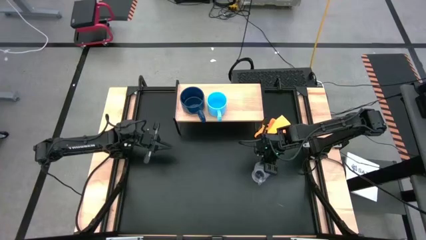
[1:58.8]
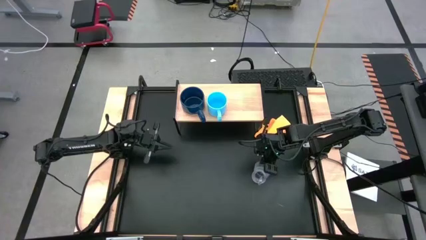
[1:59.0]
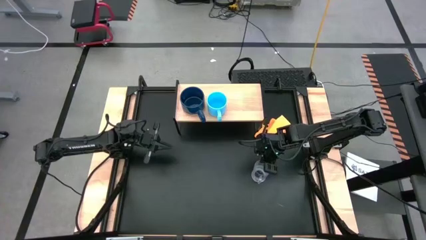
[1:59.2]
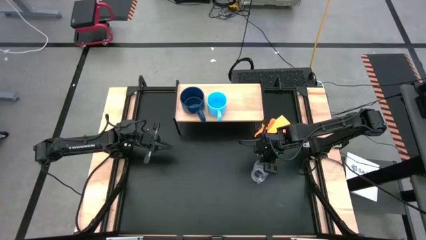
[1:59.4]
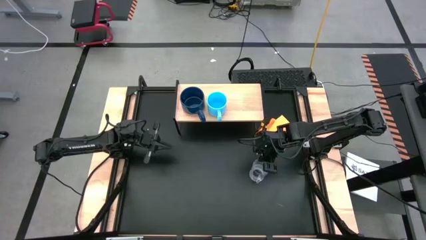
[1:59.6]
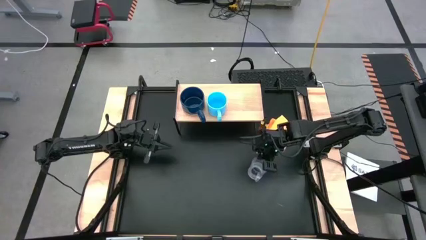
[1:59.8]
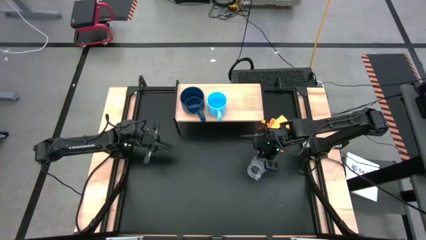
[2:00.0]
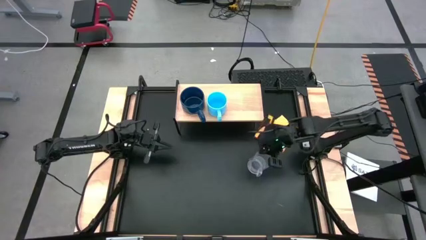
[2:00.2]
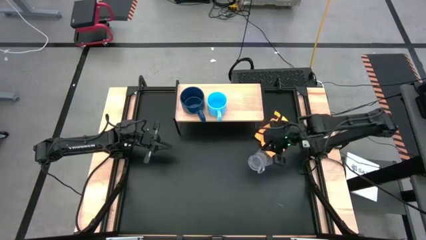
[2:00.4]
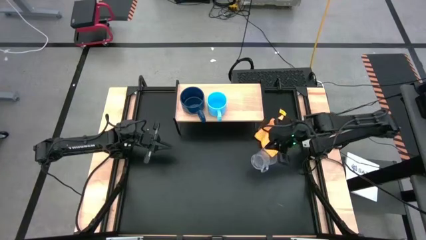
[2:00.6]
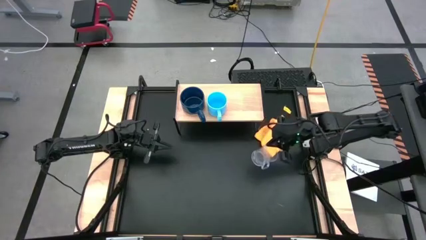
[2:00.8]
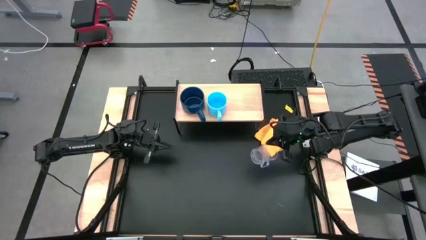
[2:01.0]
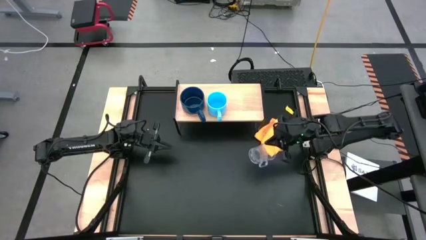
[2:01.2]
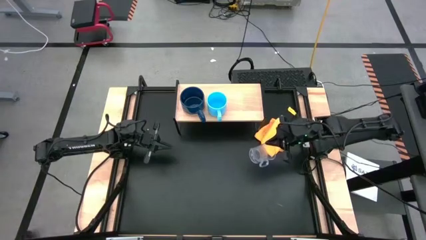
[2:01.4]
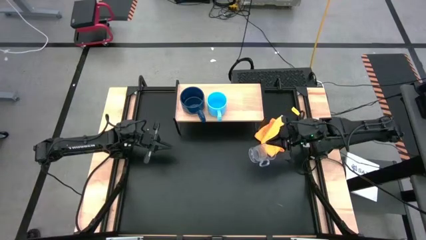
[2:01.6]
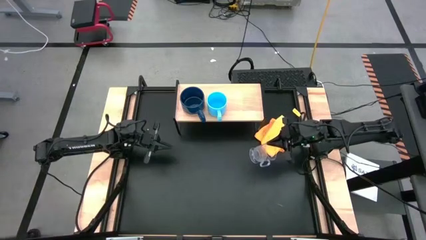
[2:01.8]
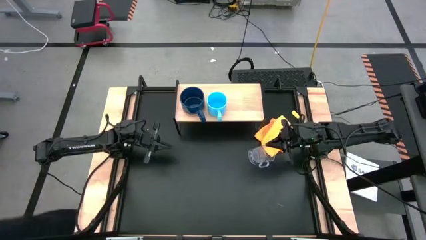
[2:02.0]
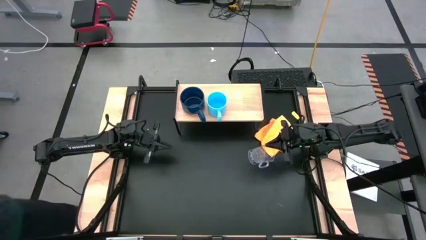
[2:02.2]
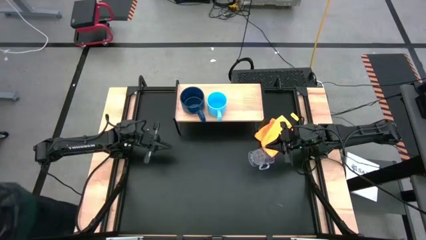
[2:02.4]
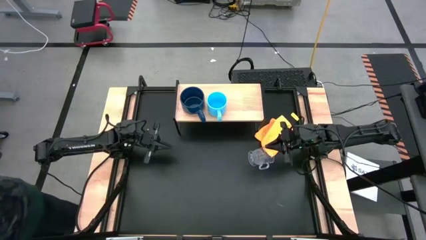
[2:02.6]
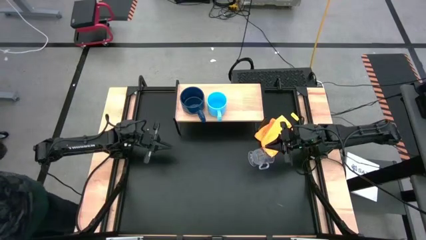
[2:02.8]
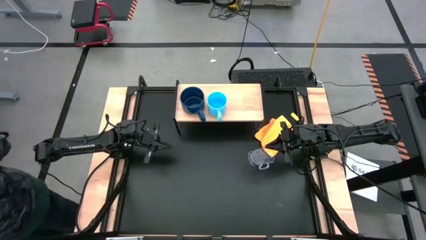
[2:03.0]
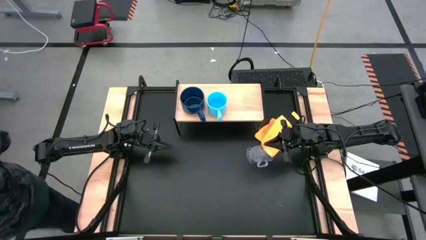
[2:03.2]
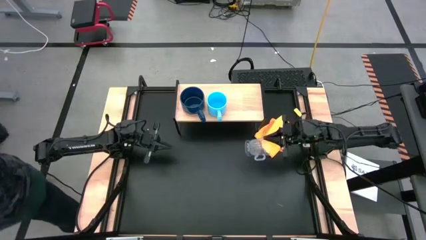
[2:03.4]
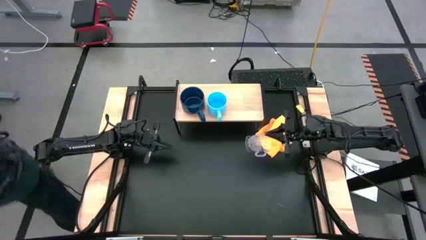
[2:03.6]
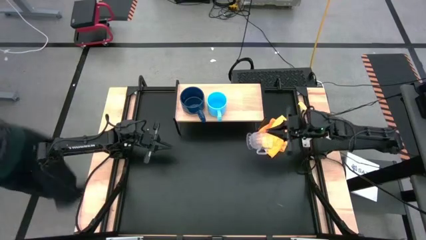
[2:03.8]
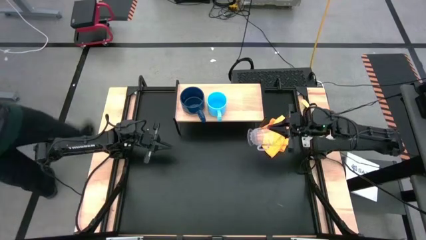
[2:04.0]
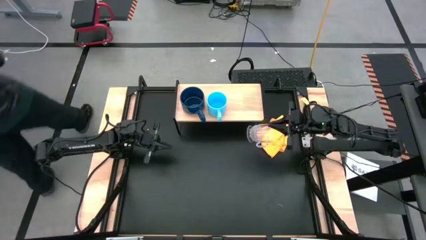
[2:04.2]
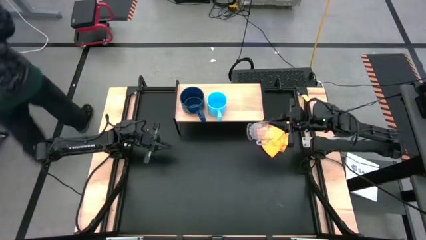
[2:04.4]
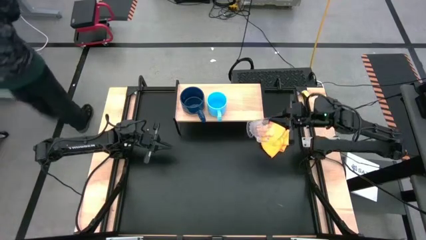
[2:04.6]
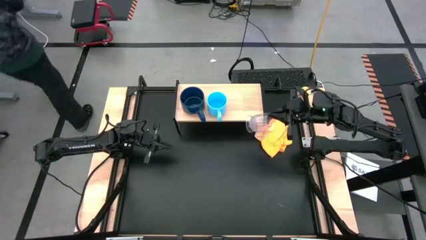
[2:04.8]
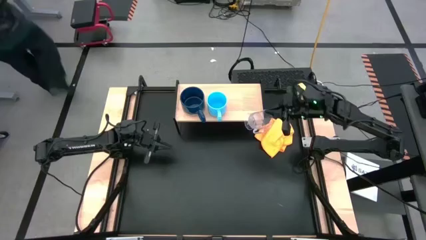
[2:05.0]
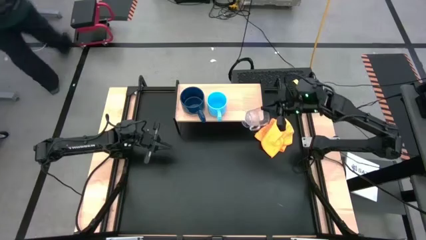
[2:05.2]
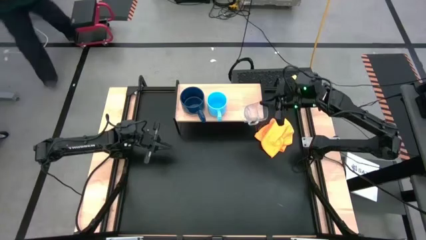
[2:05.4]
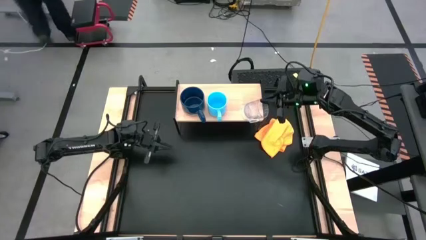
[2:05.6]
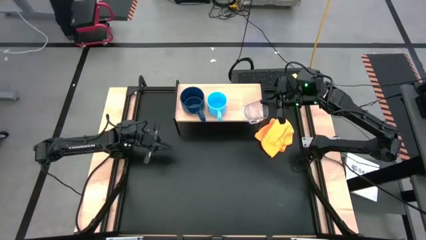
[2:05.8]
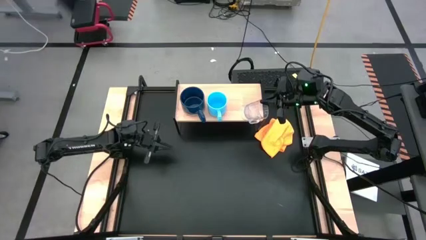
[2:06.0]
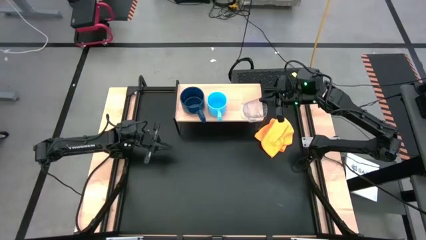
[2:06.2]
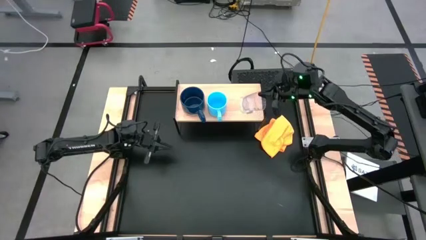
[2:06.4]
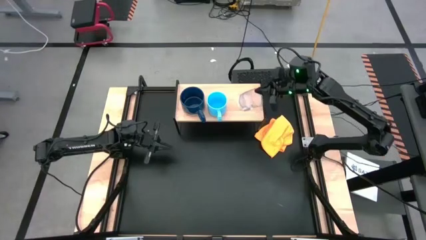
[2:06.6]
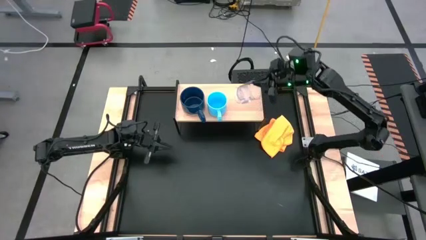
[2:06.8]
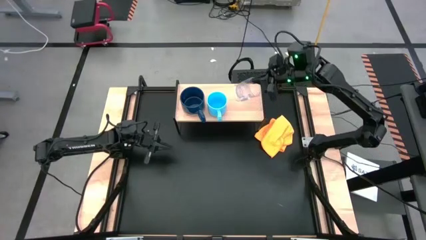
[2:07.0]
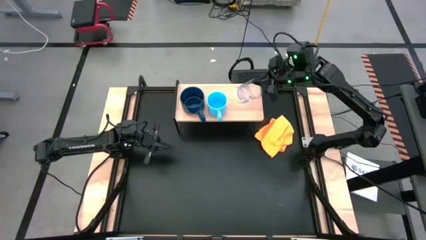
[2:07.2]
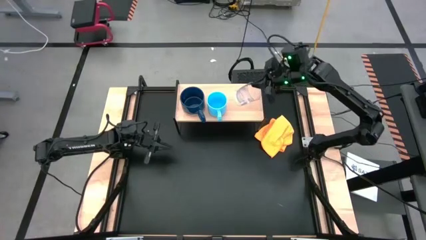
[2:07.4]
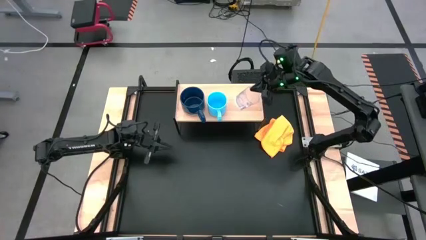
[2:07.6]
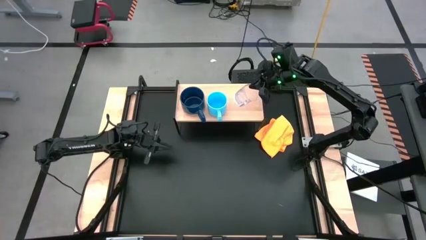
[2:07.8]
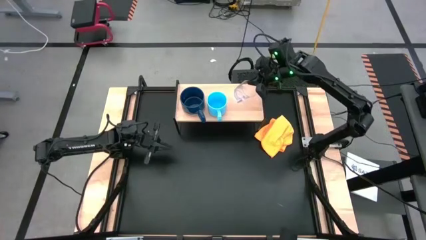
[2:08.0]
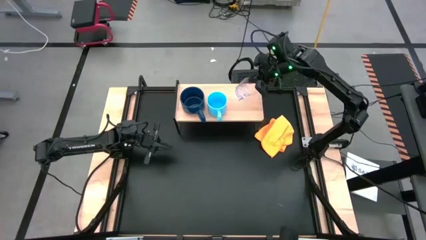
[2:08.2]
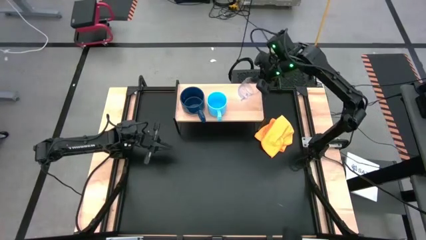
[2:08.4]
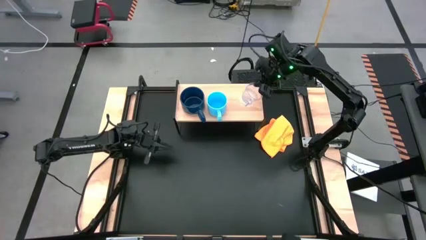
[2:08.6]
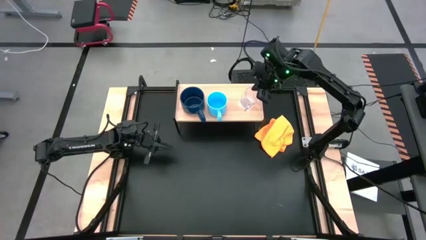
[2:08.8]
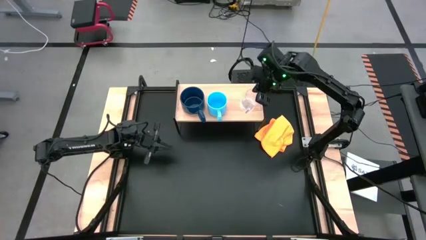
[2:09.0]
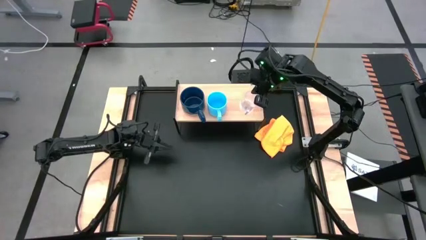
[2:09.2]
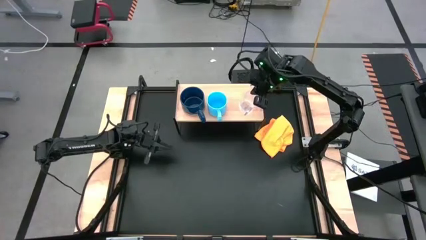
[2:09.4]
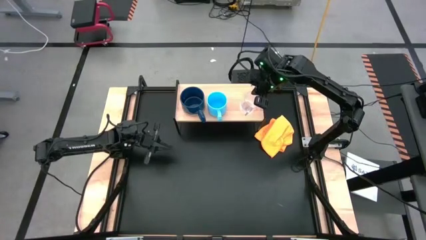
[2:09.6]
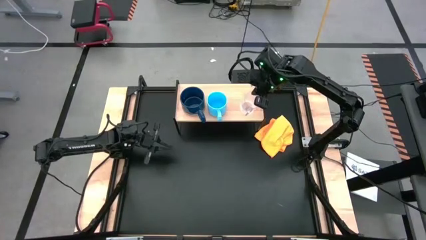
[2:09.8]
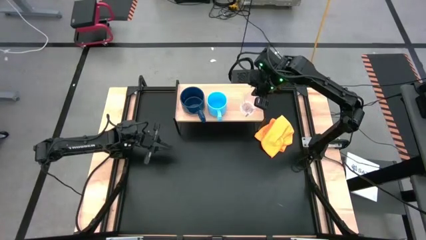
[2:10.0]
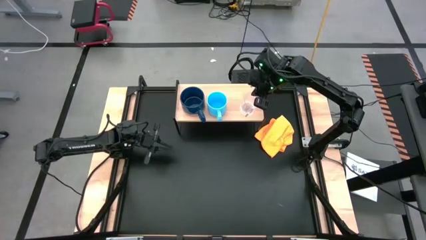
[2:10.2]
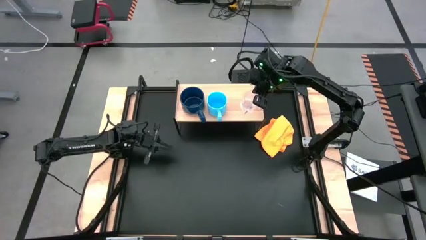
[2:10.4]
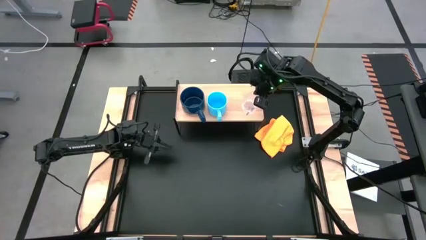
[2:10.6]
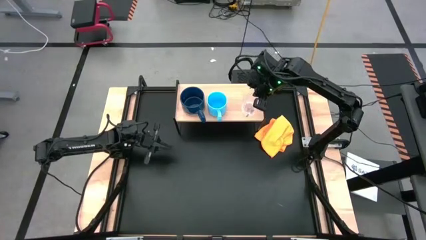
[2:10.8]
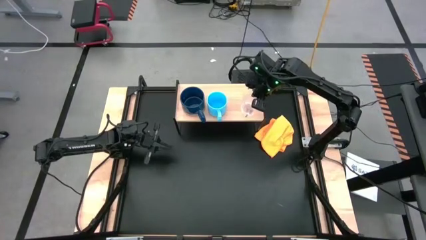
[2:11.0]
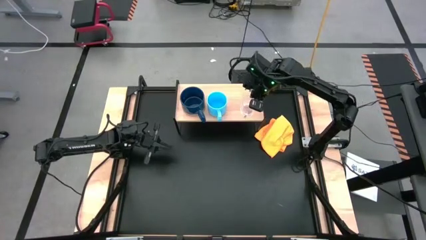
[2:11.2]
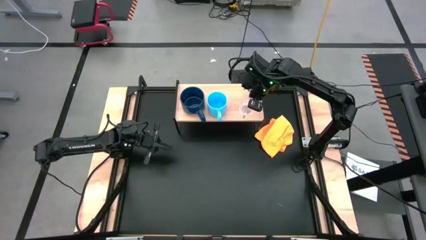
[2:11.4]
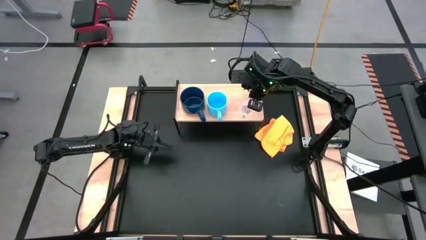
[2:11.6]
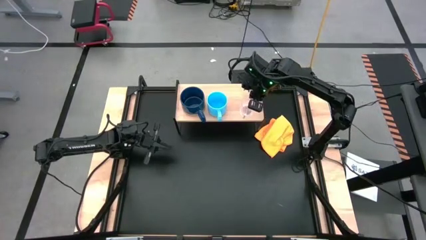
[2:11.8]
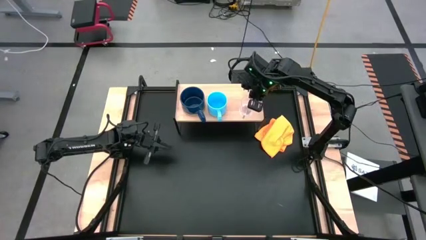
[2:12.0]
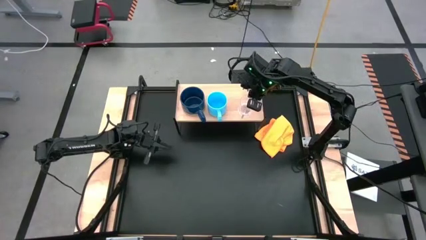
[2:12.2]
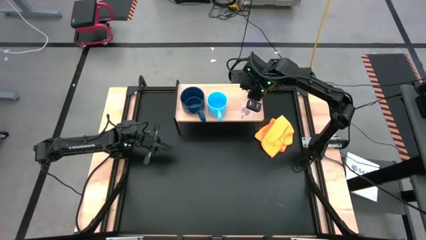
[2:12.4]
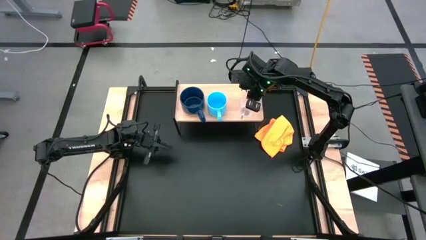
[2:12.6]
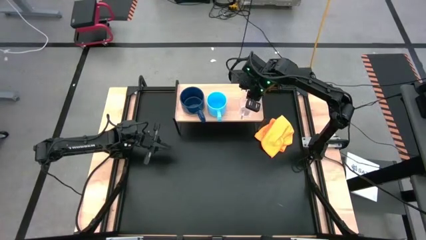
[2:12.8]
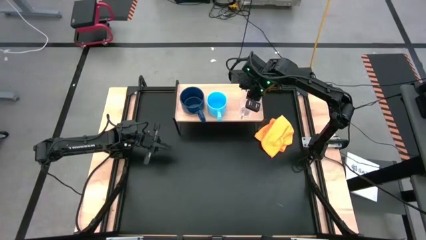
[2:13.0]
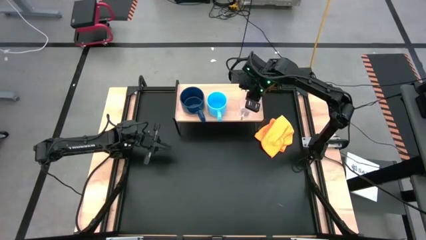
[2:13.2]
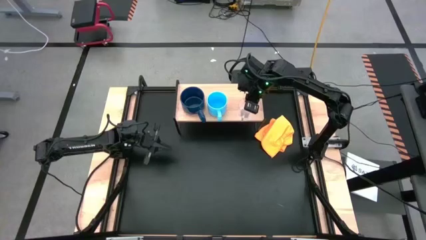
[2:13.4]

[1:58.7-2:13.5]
Task: Stack small to large cups/mugs on shelf
Put the transparent mug on the shelf
